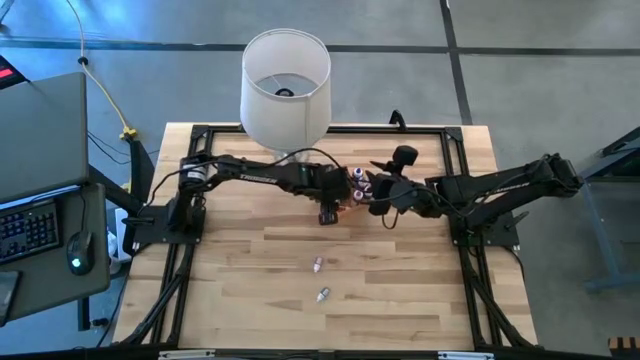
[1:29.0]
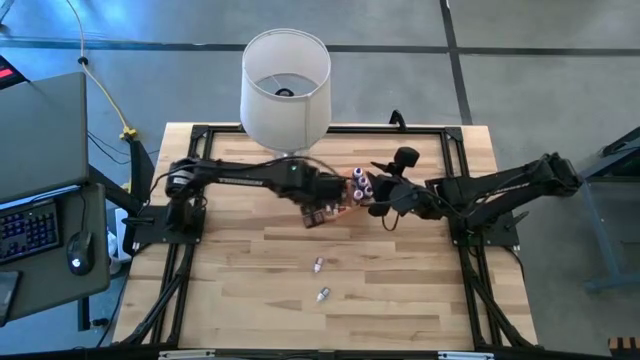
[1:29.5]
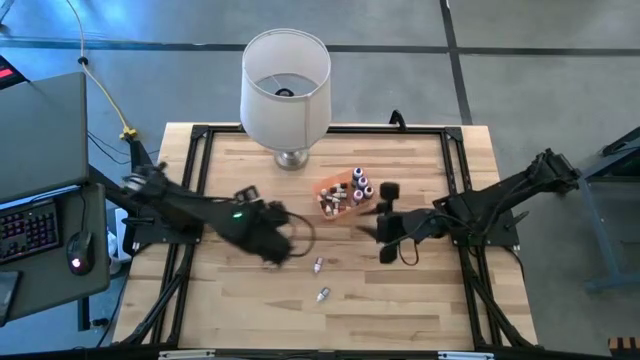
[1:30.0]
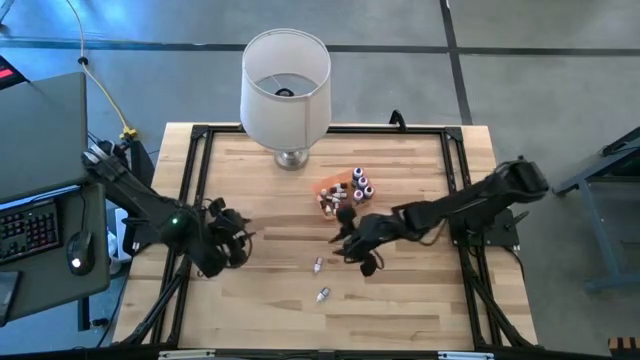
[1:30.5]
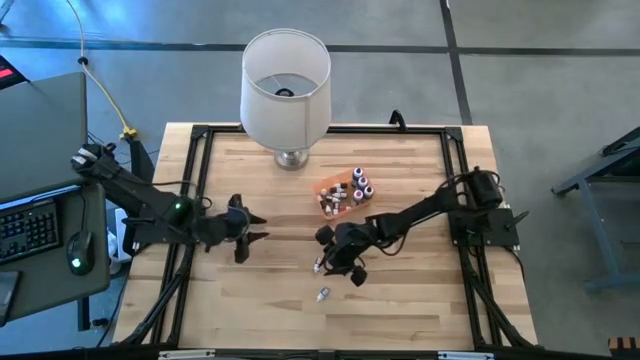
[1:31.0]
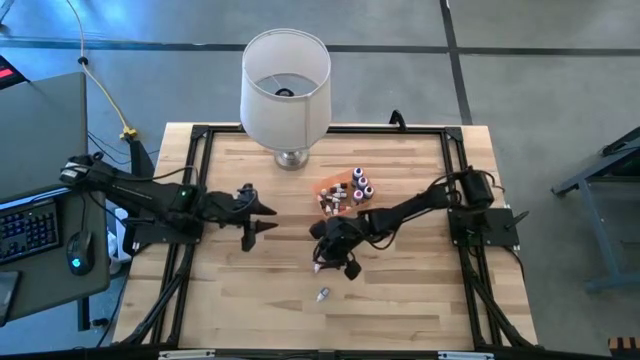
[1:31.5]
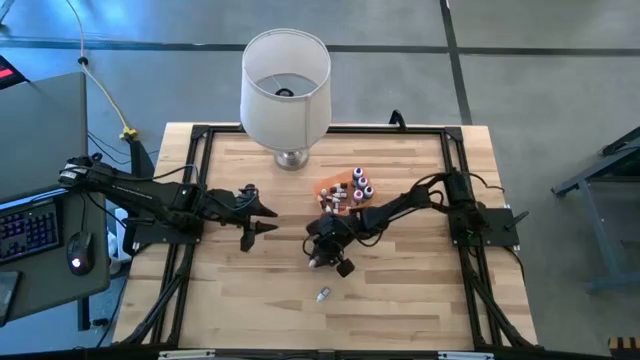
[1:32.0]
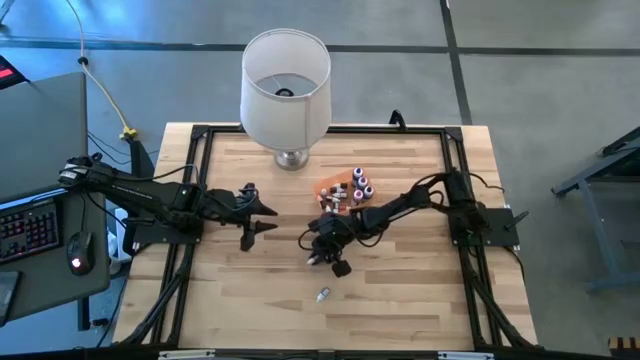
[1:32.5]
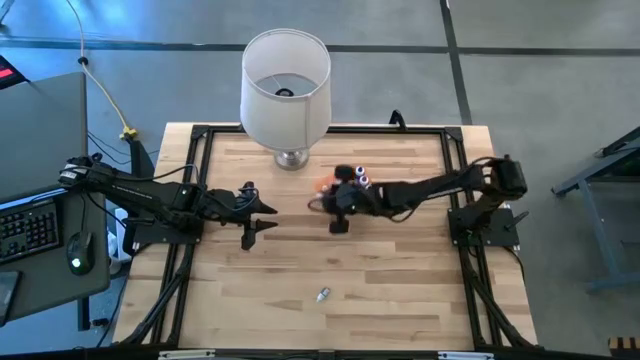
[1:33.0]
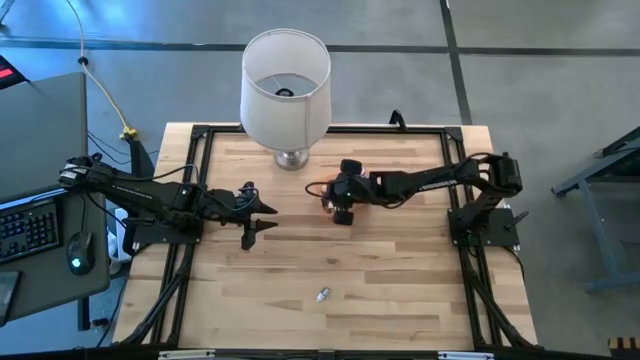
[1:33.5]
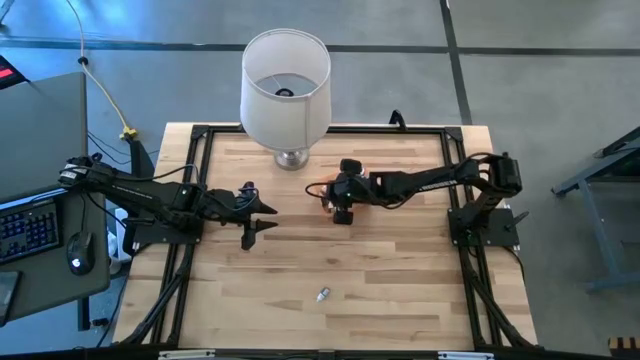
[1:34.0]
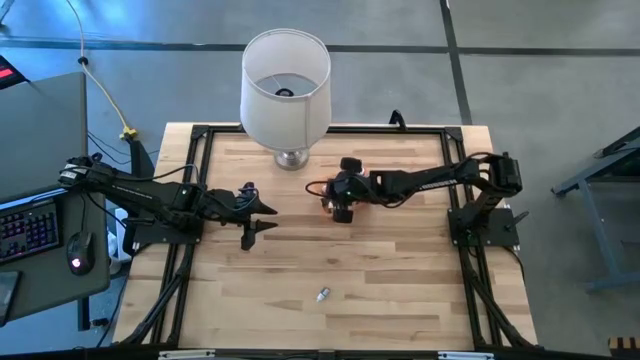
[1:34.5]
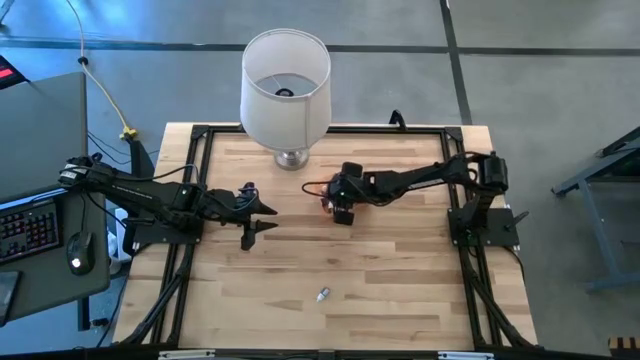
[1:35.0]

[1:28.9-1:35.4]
Task: Pick & Place food coloring
Put the small yellow food coloring bottle into the orange bin

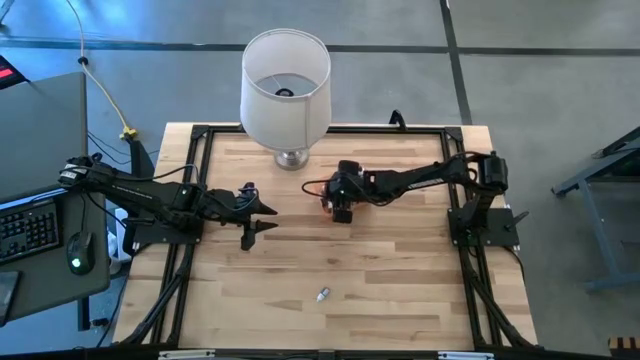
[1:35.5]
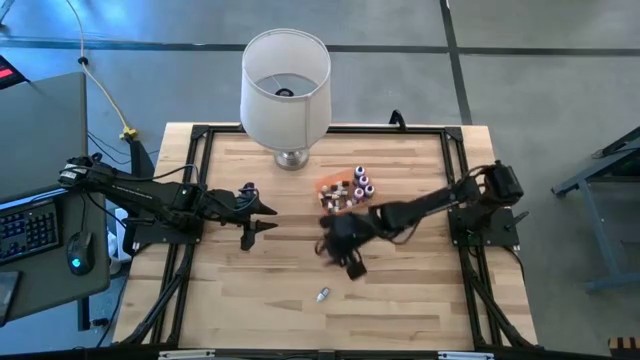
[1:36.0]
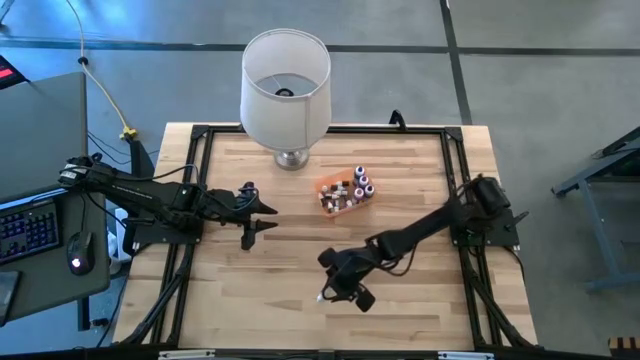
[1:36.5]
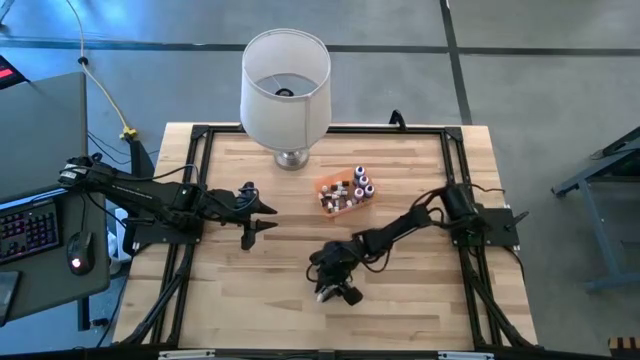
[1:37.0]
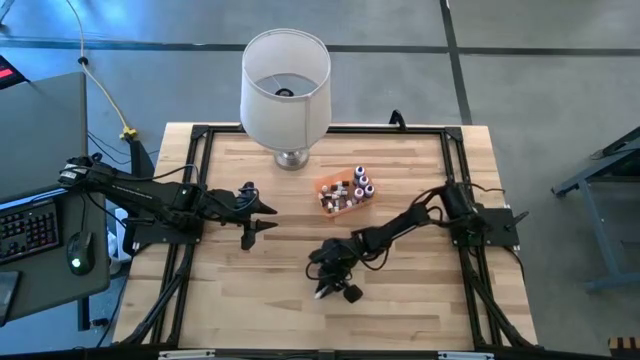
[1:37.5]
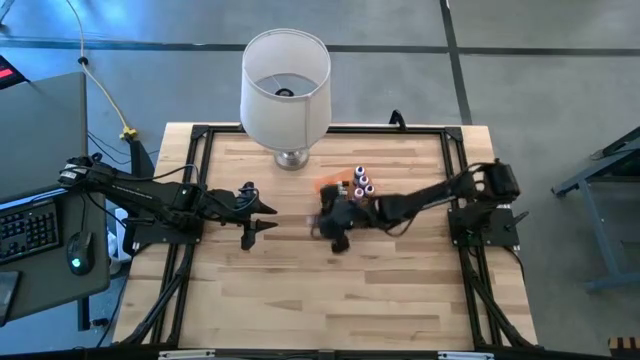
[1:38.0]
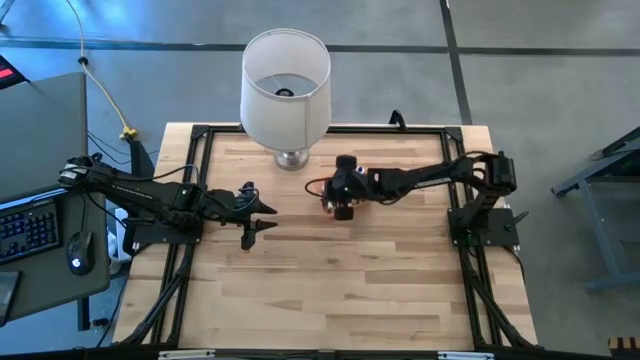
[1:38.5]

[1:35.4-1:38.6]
Put the small blue food coloring bottle into the orange bin

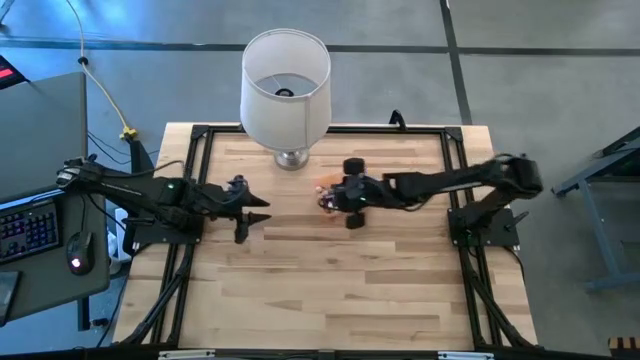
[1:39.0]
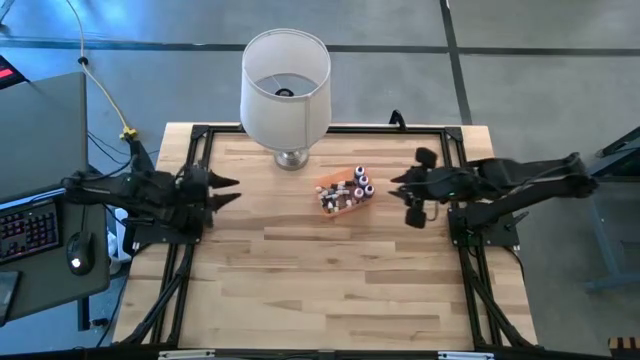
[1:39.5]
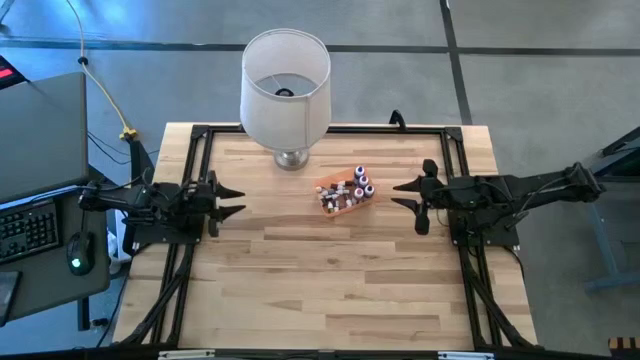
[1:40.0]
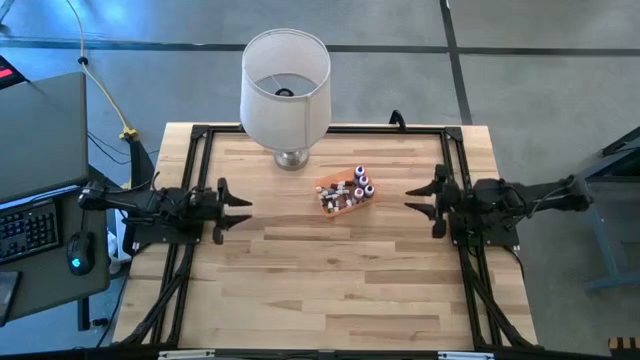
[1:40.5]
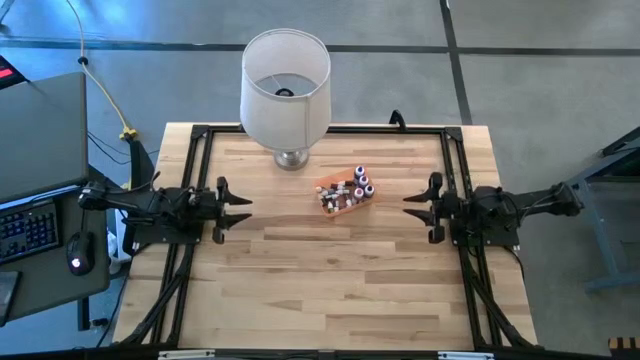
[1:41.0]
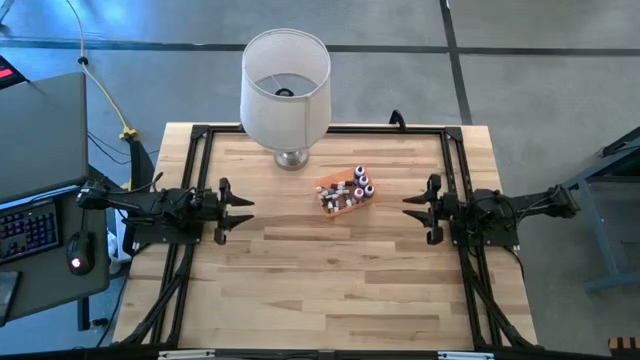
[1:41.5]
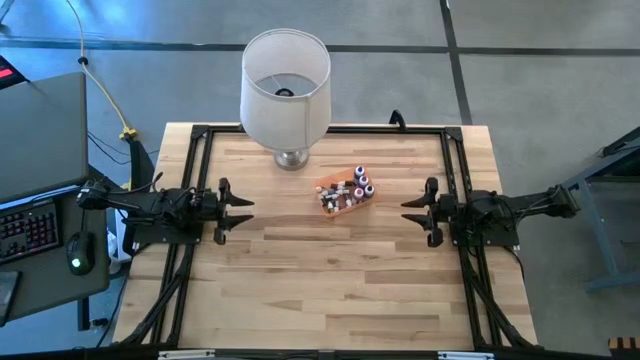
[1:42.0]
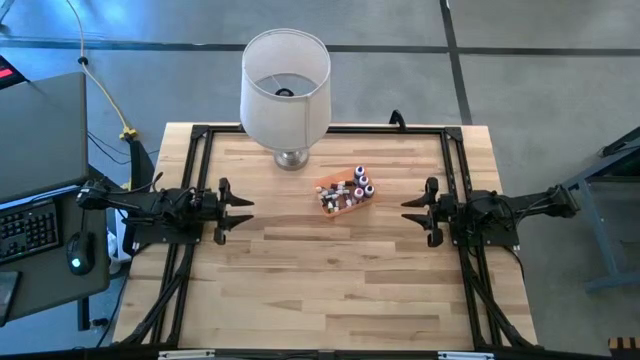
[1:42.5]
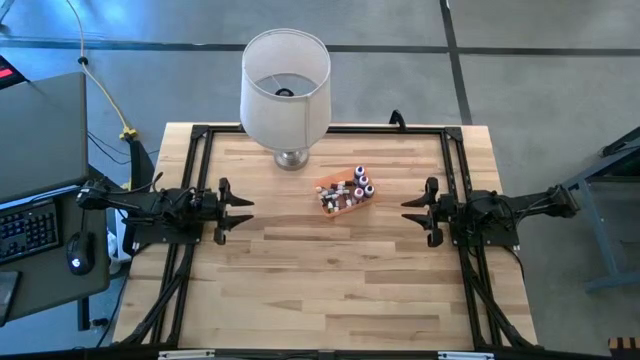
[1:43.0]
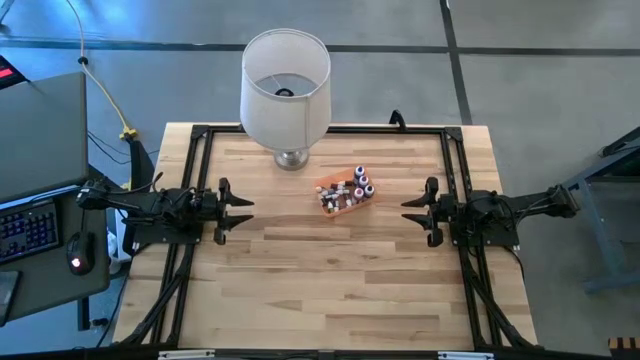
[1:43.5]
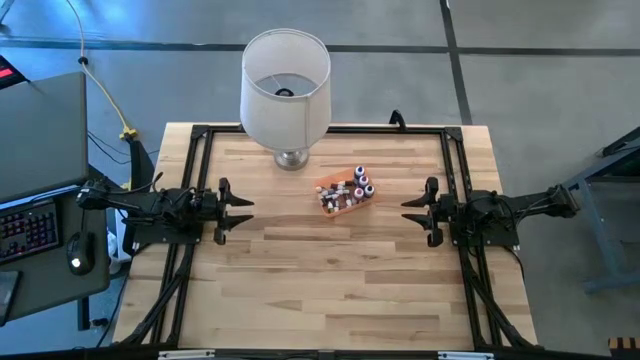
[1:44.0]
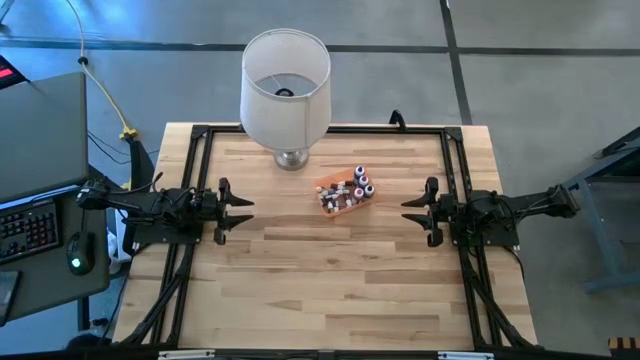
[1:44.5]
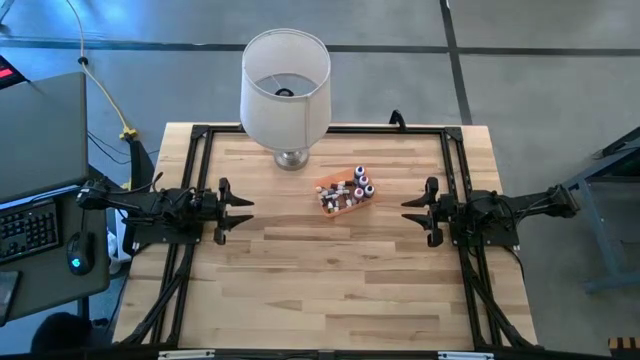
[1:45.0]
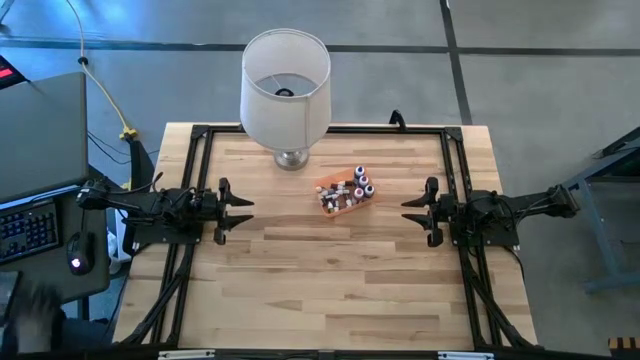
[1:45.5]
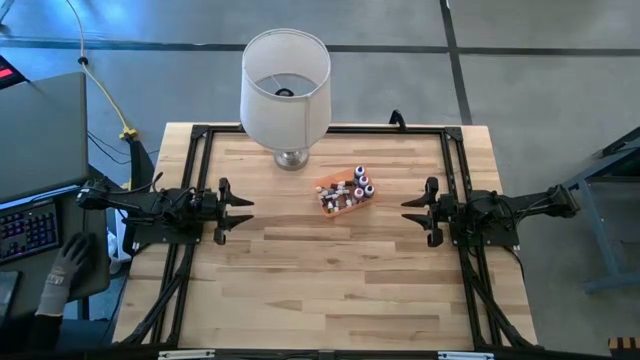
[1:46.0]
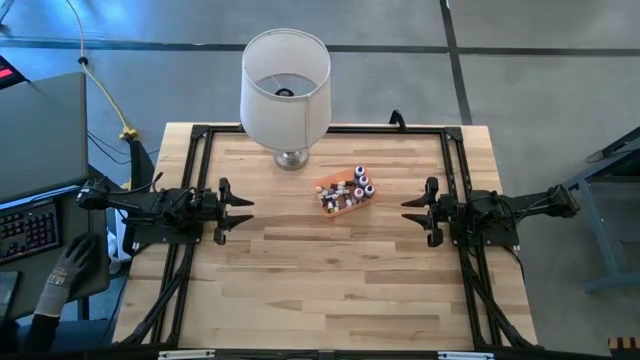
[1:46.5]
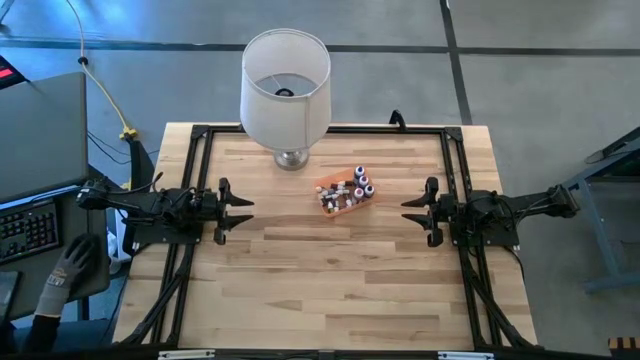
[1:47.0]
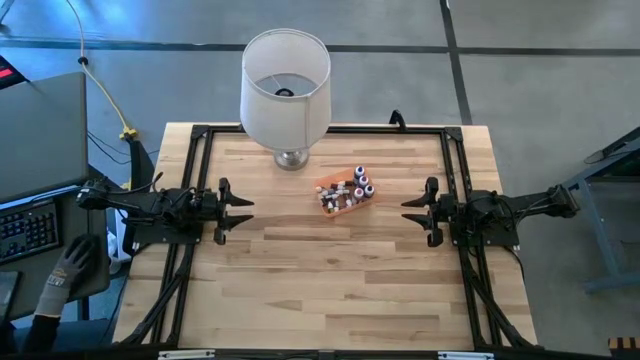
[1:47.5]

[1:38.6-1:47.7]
Return to Home Position

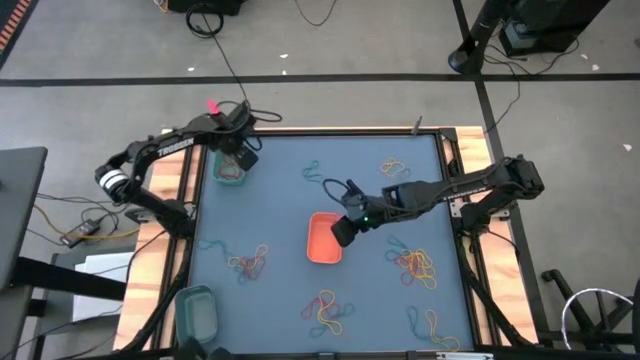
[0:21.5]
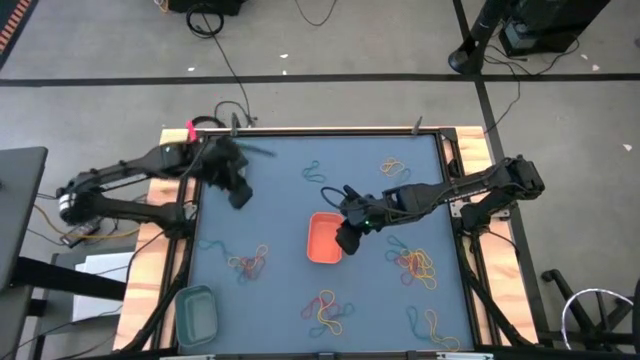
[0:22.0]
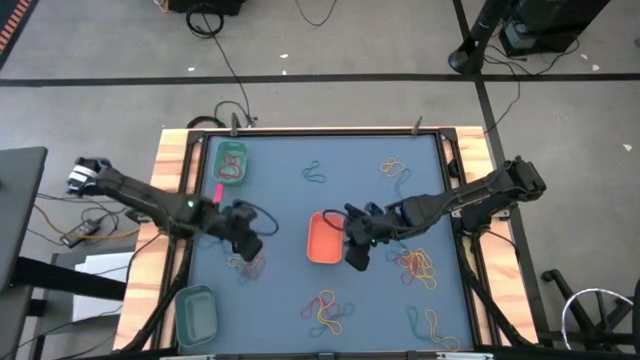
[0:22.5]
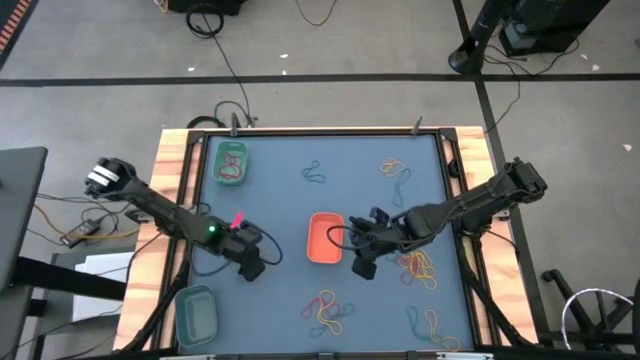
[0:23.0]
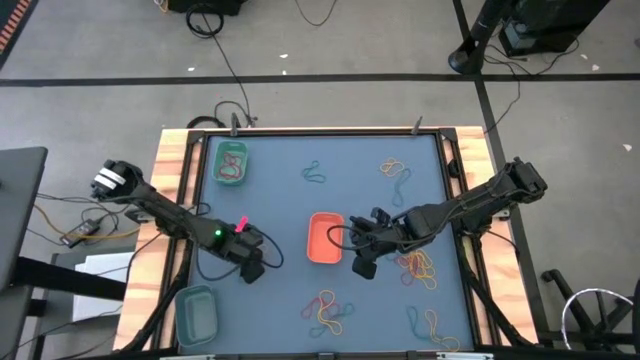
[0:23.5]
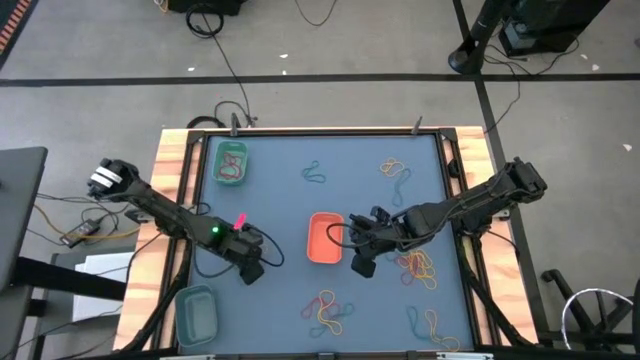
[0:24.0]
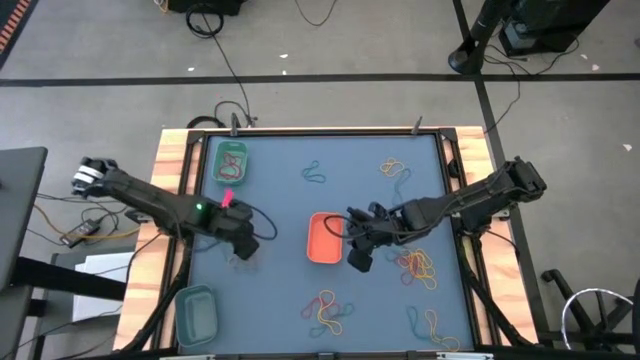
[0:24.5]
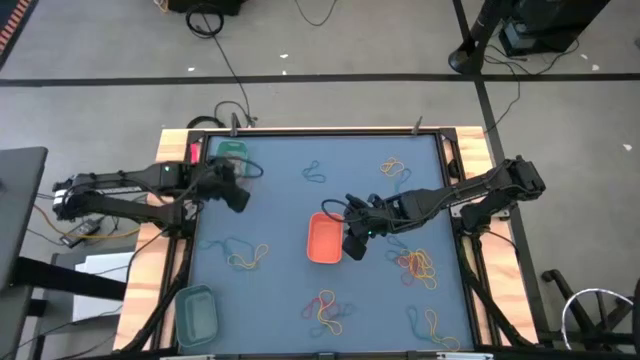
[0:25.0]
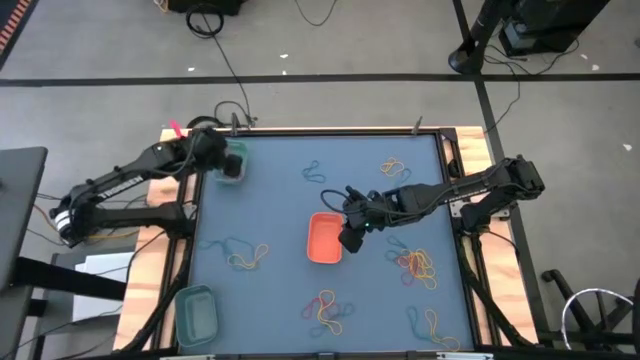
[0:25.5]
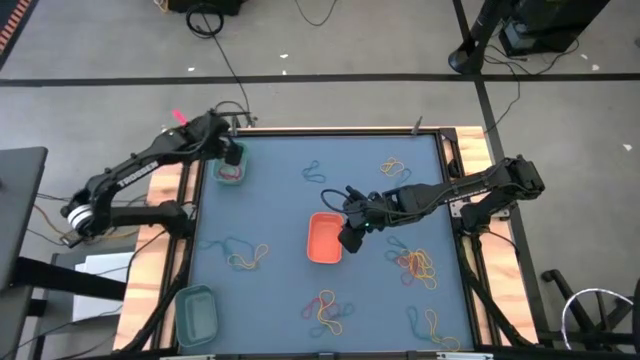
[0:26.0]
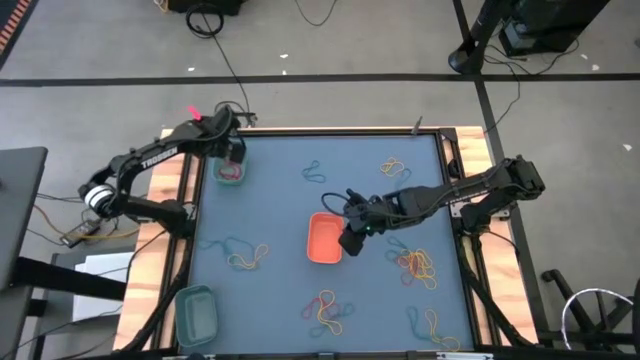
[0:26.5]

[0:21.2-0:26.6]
Task: Sort rubber bands into baskets
Put the red rubber band into the green bin
